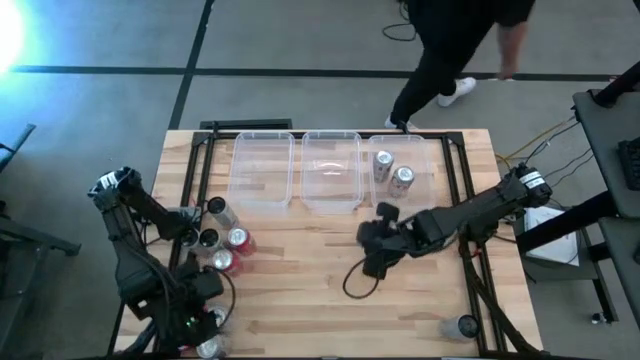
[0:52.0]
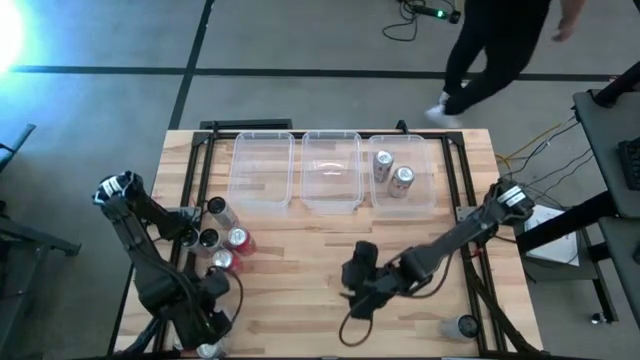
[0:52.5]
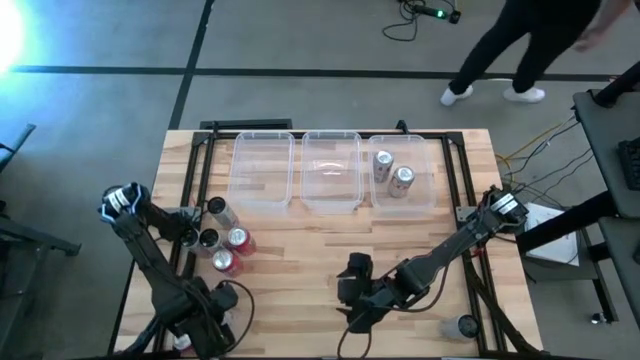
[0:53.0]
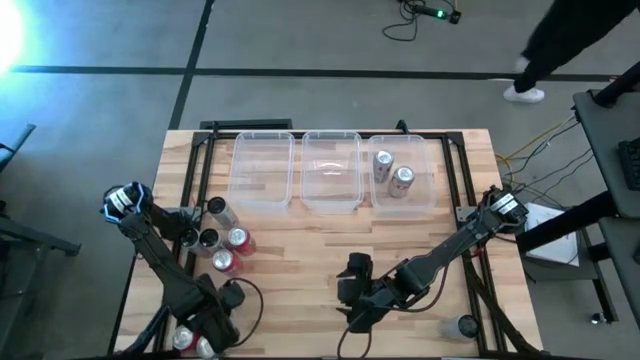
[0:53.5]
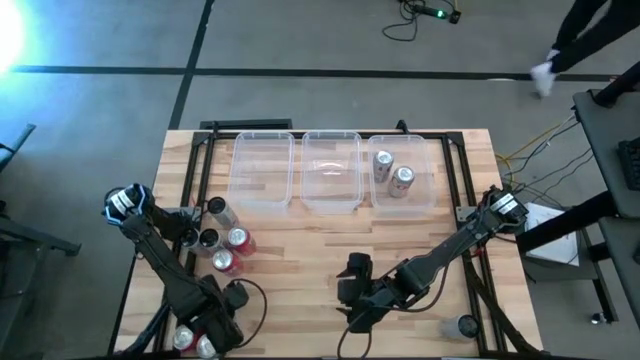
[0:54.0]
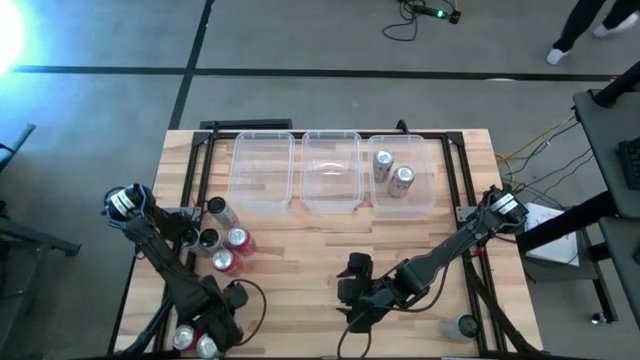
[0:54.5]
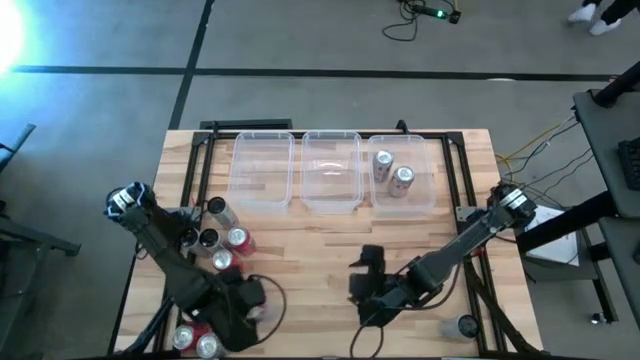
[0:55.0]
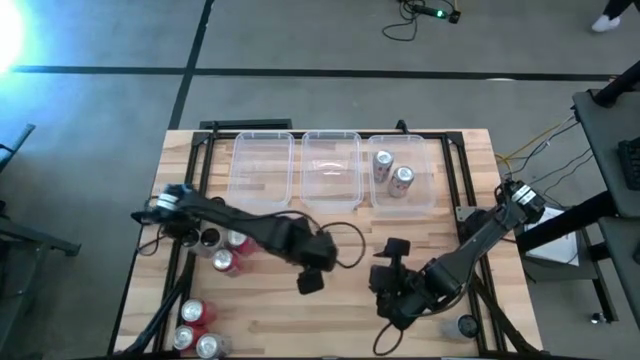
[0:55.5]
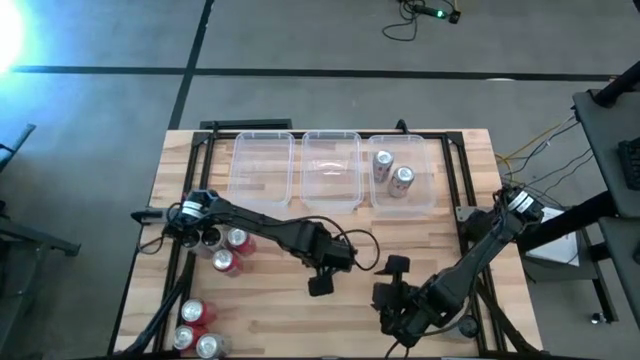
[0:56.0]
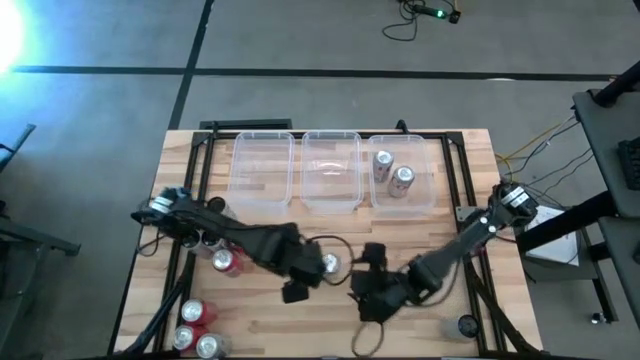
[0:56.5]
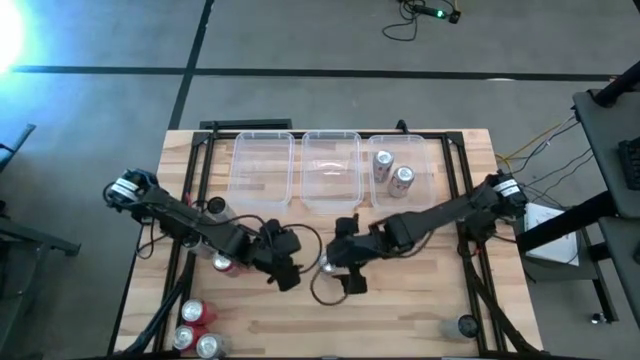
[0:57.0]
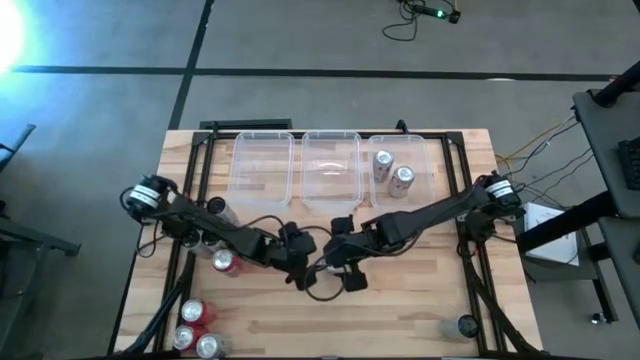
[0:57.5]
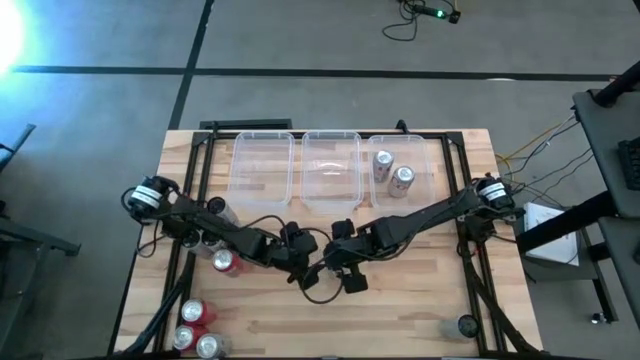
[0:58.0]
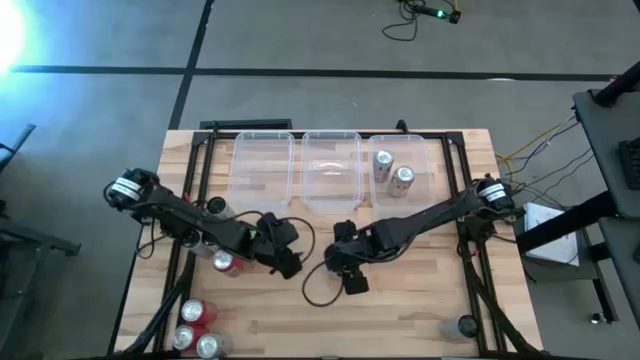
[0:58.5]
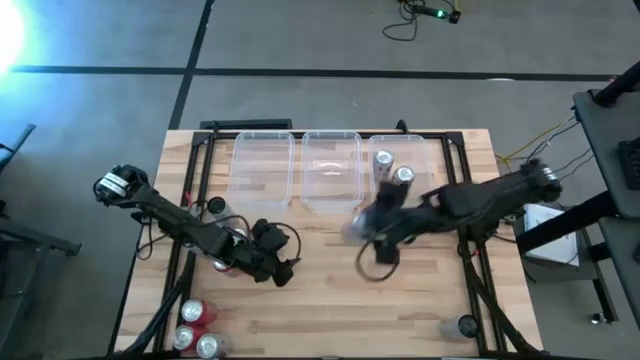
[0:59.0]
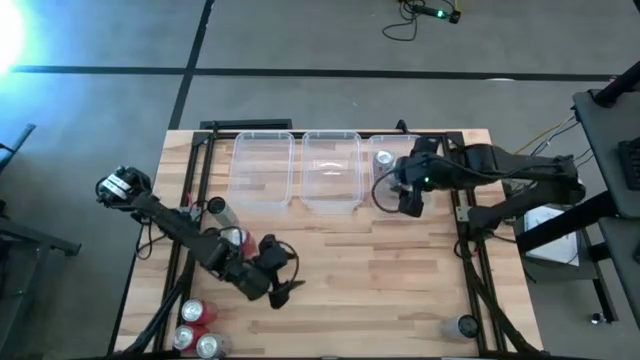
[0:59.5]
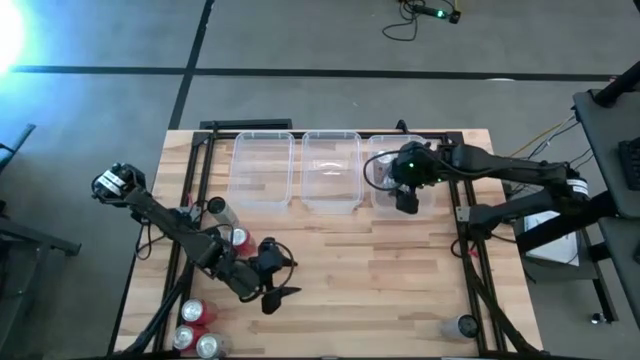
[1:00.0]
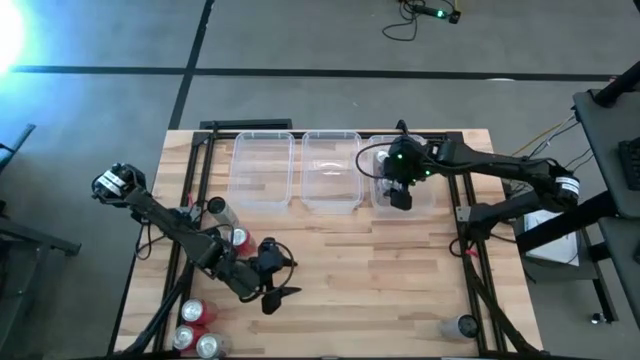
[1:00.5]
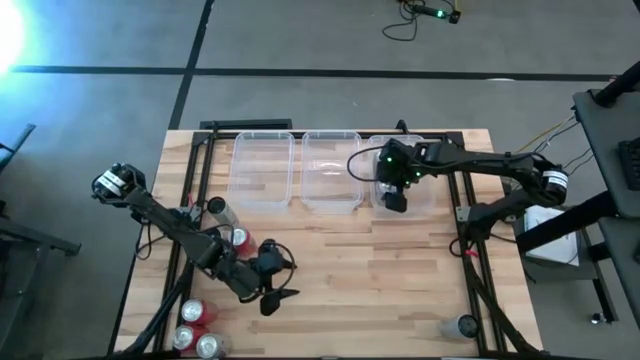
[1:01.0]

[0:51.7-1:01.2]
Task: Sort soda cans
Put the red-silver soda can into the right transparent bin

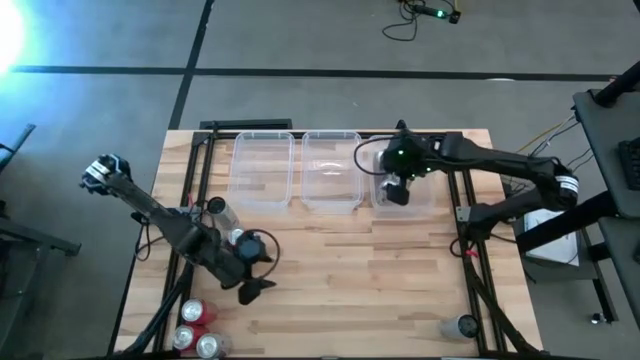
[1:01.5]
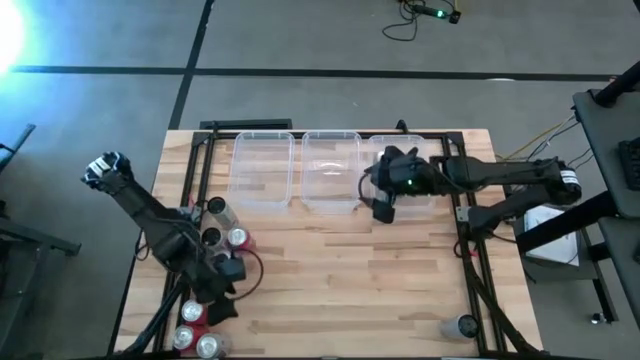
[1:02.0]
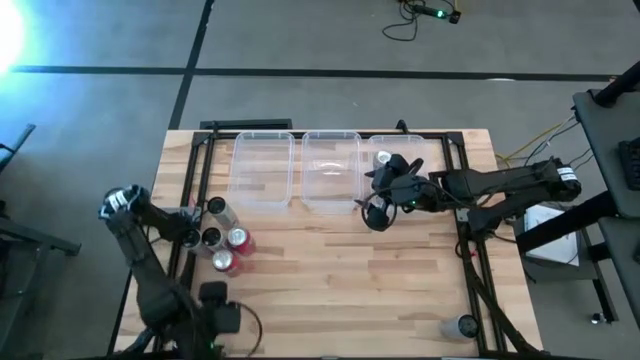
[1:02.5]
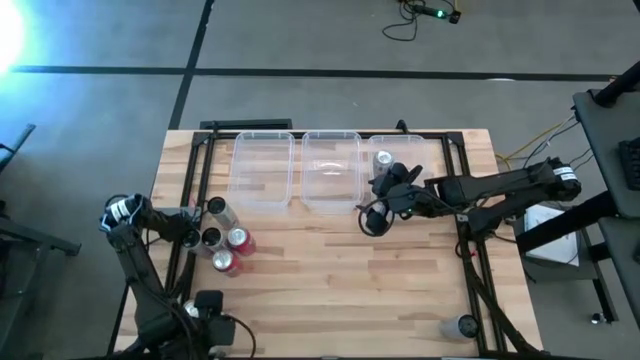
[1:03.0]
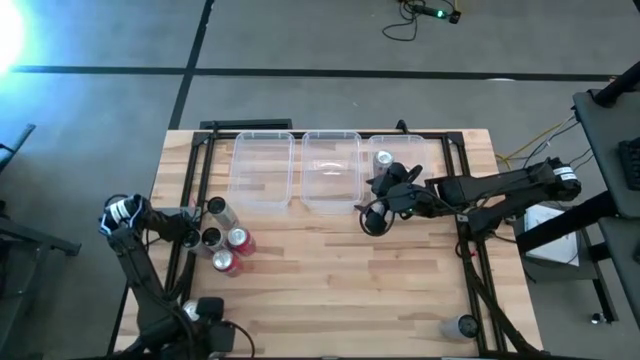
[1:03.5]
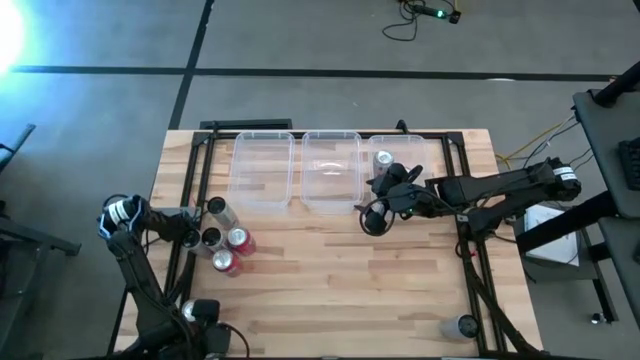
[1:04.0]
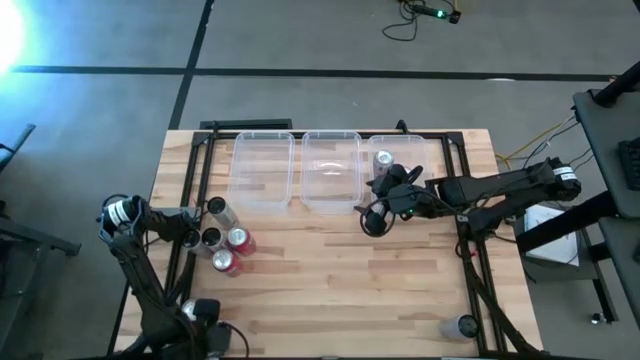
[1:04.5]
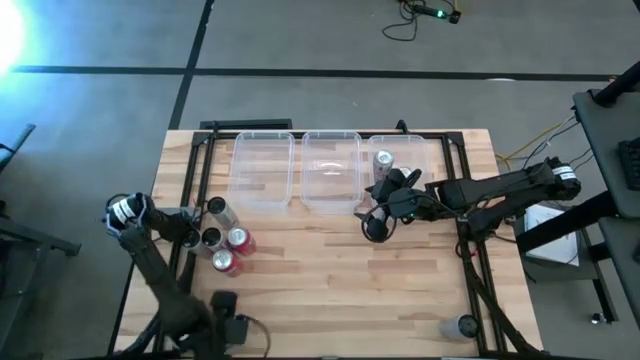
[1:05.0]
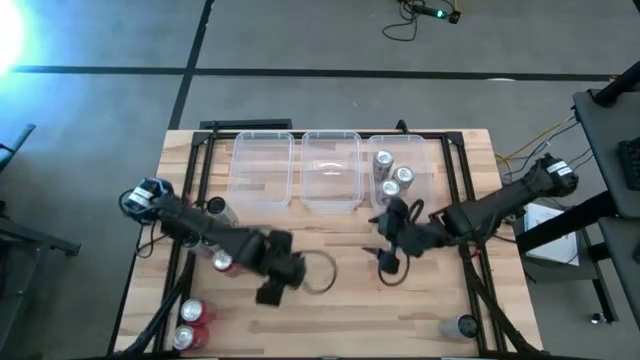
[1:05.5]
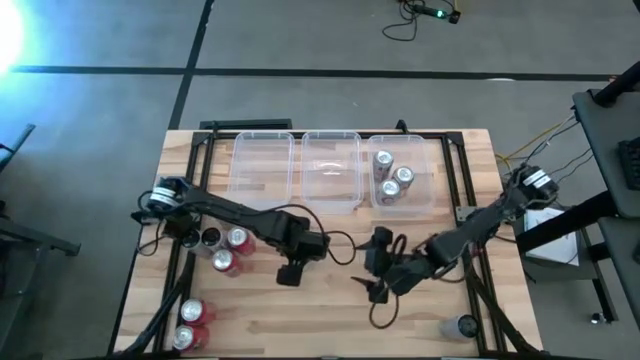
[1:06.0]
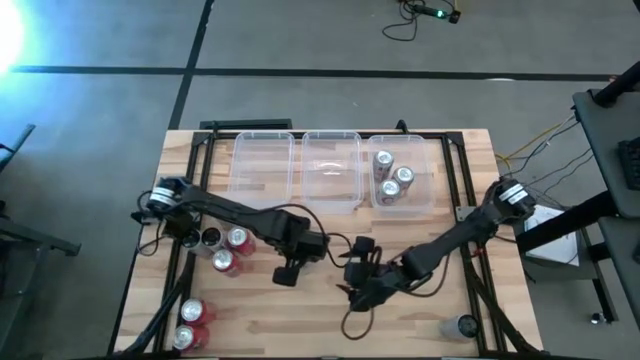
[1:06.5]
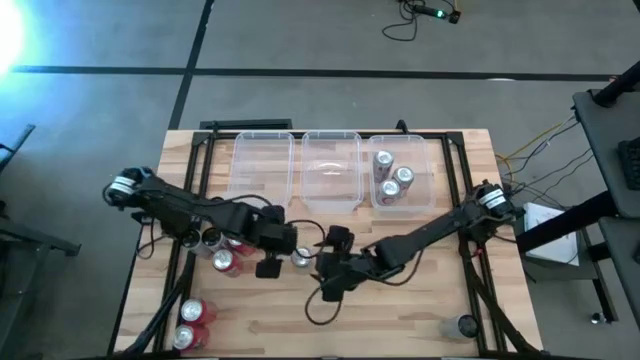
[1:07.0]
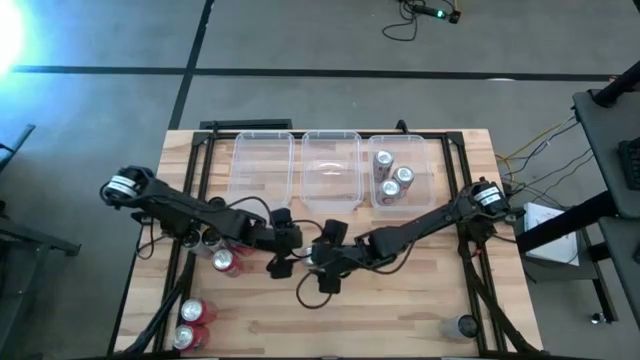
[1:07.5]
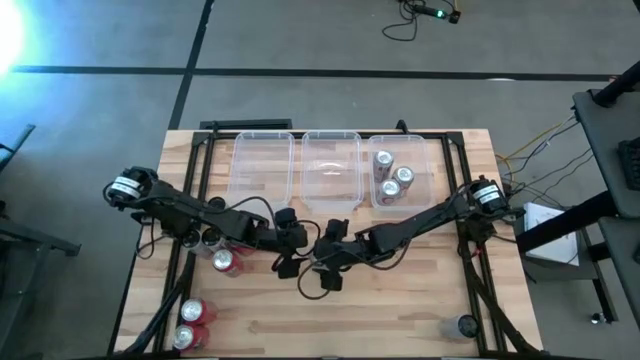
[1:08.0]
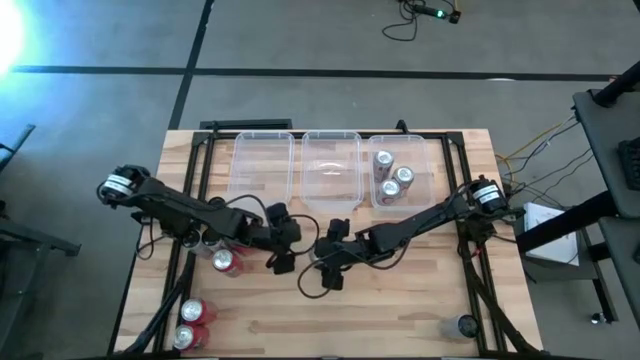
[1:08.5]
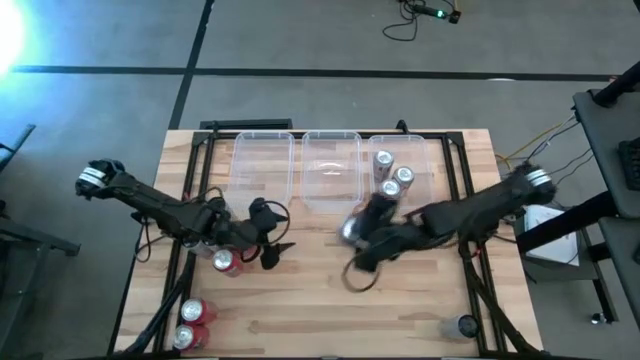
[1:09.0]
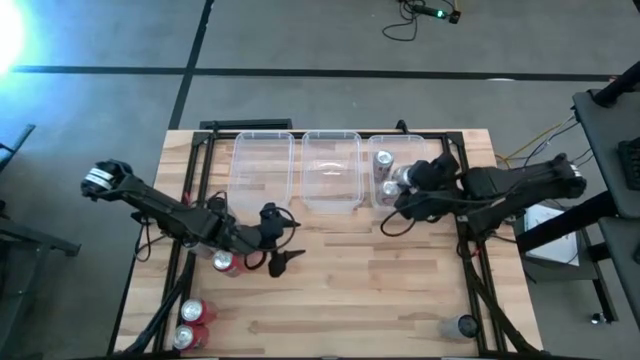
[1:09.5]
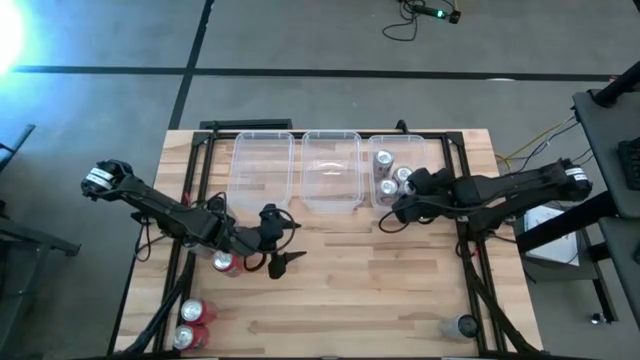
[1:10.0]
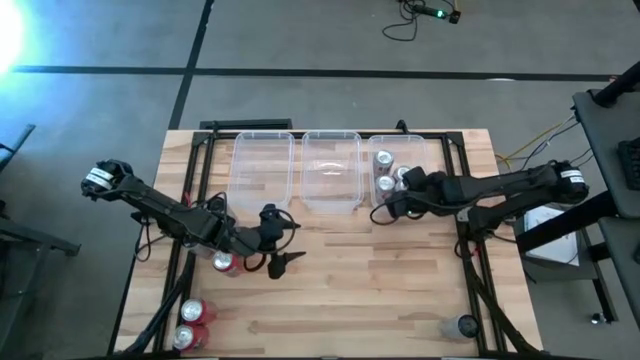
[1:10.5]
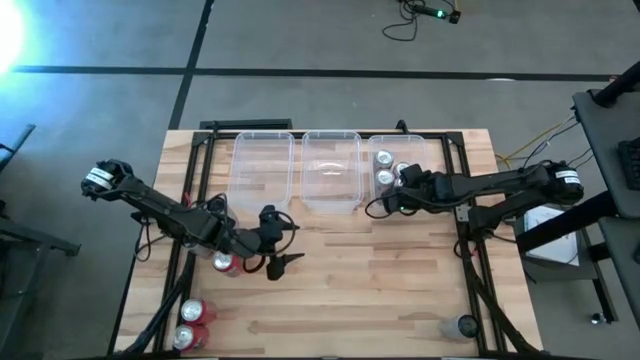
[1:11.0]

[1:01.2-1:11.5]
Put the red-silver soda can into the right transparent bin
